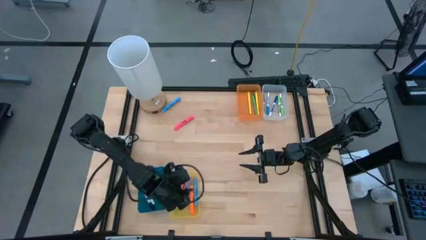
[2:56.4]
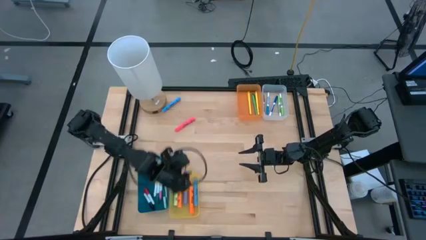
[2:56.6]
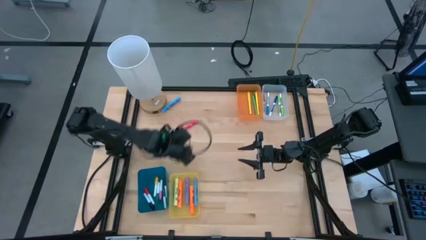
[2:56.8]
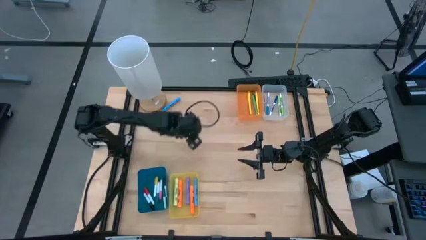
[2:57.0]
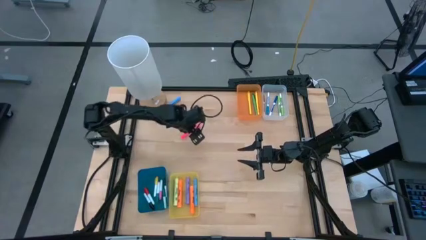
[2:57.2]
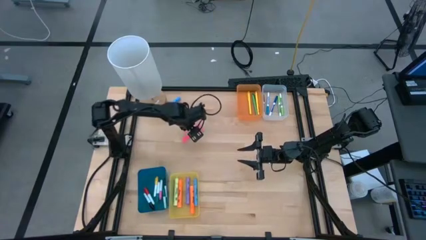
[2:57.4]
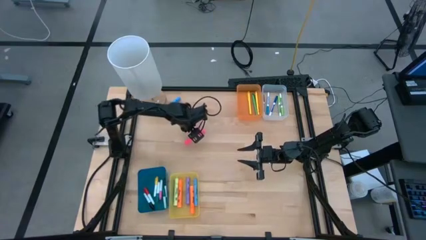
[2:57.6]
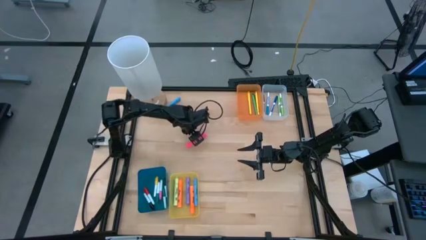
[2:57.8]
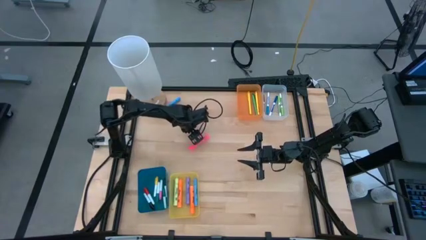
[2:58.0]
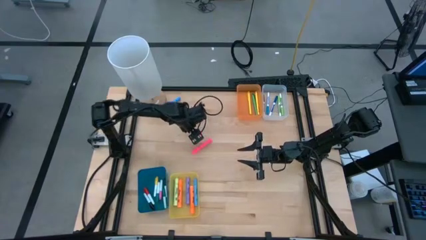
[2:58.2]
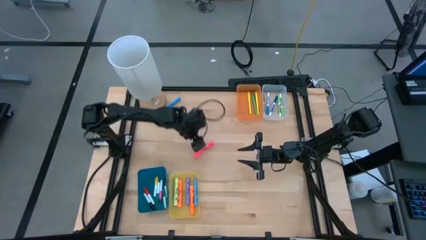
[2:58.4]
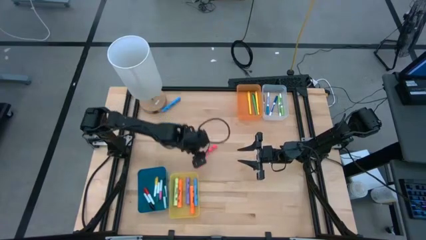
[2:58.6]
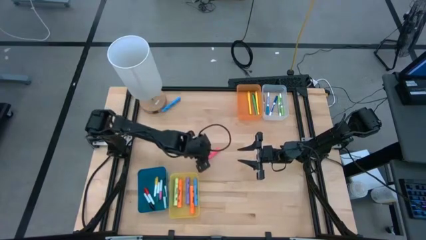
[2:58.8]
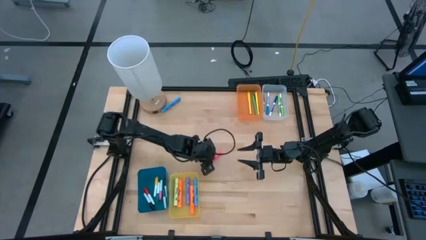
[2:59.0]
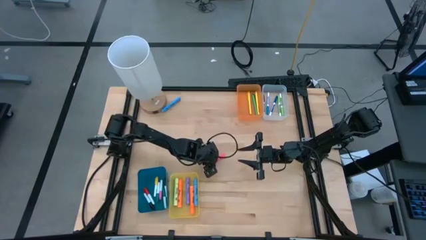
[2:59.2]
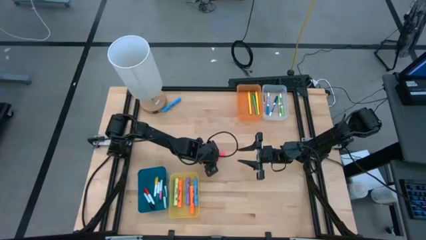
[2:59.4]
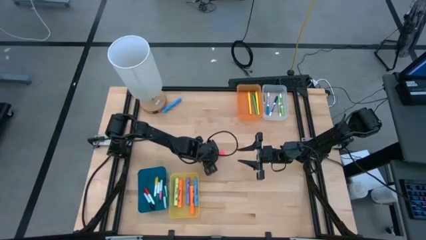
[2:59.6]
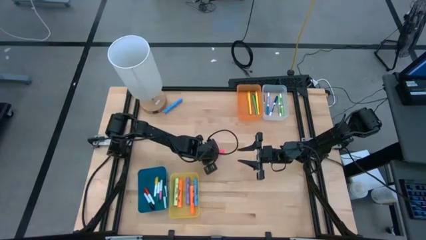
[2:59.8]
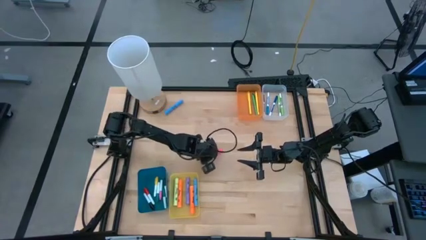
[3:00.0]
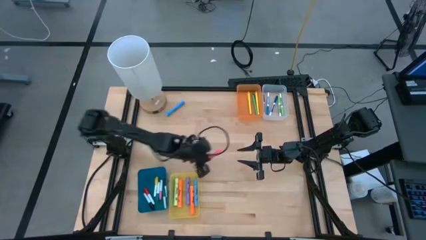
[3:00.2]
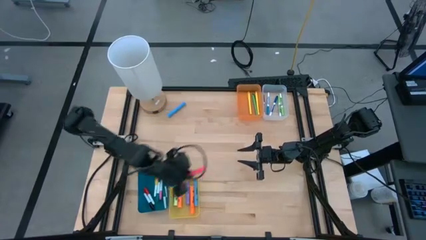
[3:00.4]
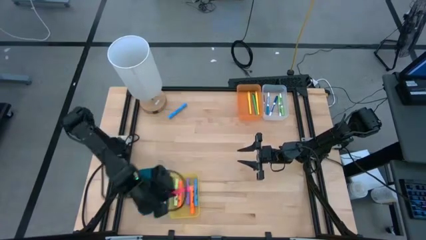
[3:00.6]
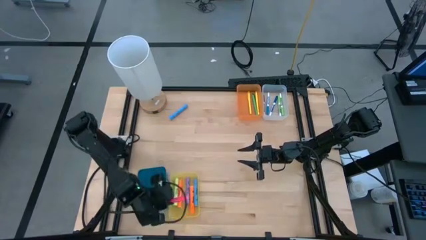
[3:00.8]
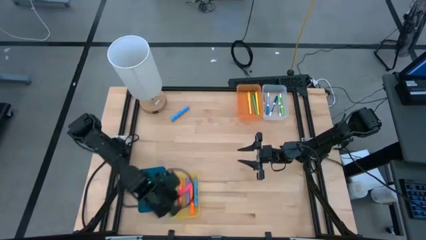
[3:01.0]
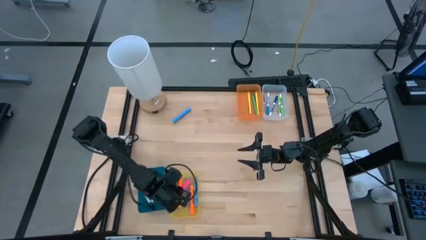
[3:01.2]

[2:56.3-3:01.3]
Task: Pick & Place Markers
Put the pink highlighter pen into the yellow bin

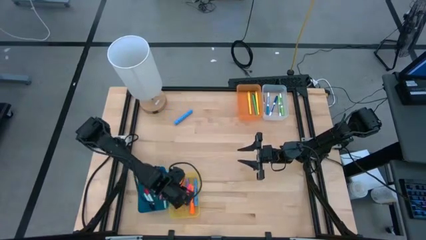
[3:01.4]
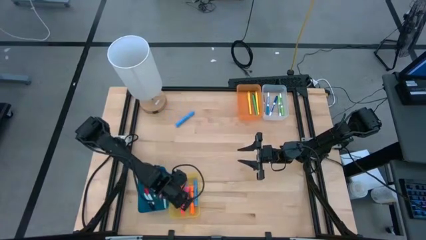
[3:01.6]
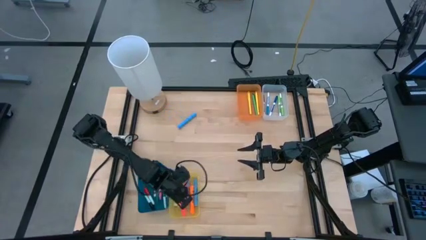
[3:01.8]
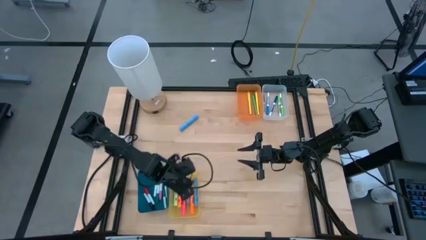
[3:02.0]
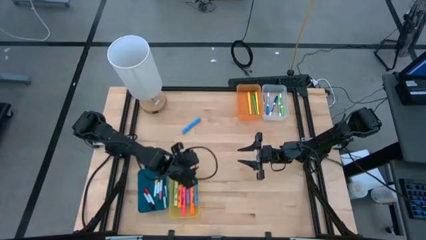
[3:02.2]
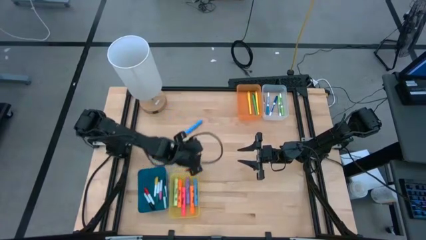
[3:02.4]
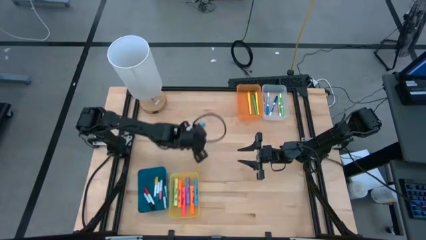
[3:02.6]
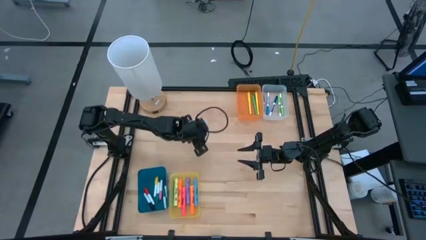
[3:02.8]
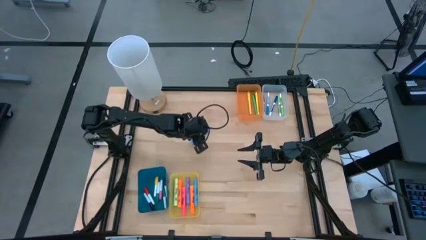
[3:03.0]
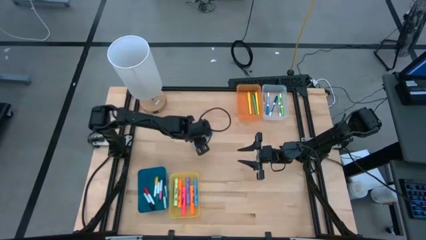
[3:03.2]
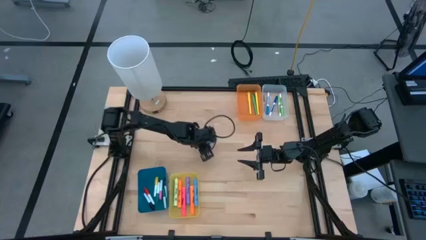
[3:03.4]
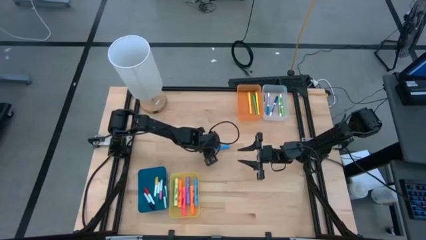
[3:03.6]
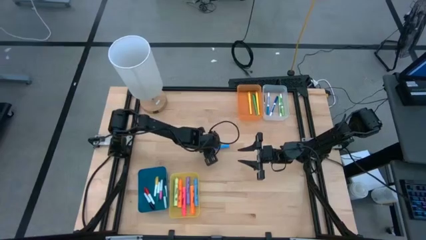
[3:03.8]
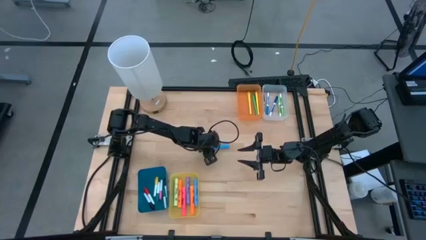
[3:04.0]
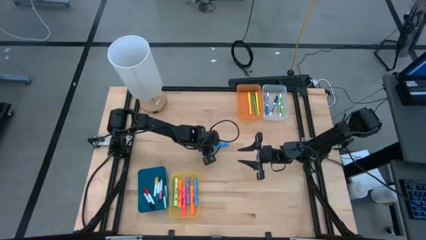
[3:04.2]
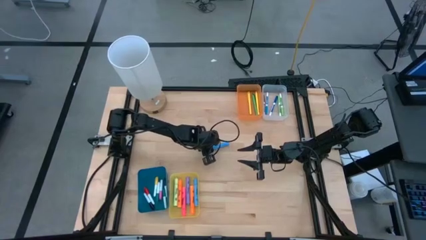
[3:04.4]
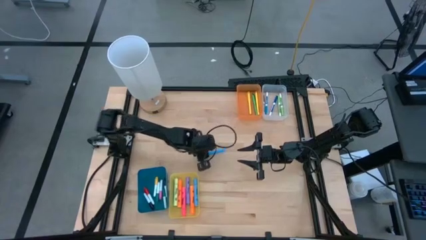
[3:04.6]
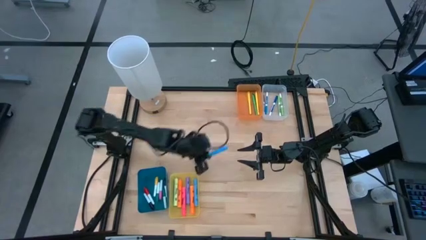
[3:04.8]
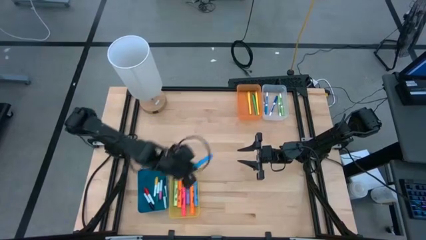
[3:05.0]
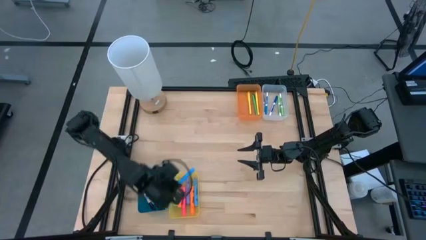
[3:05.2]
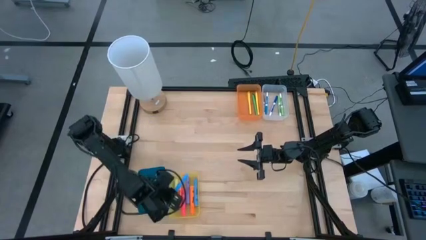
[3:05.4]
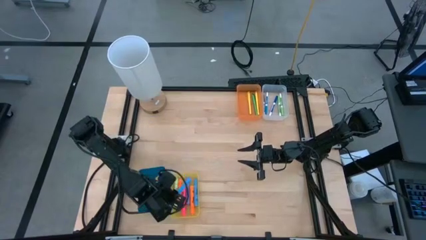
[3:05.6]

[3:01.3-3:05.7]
Put the light blue highlighter pen into the yellow bin

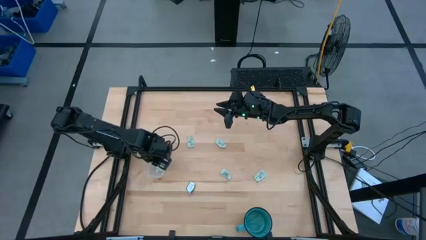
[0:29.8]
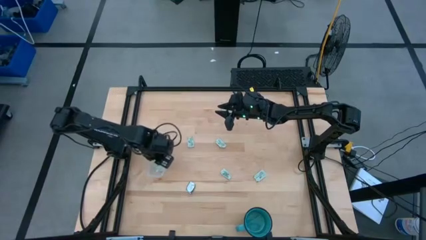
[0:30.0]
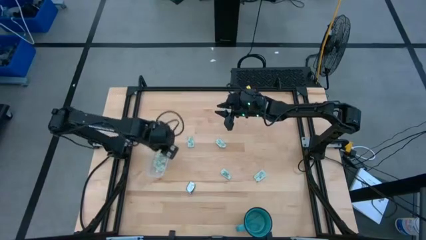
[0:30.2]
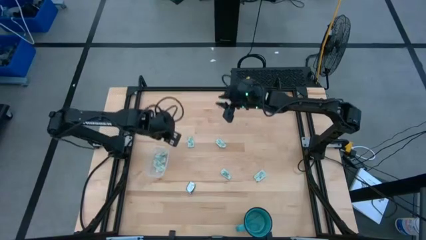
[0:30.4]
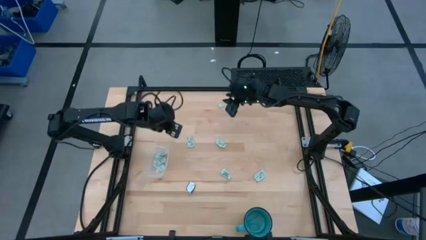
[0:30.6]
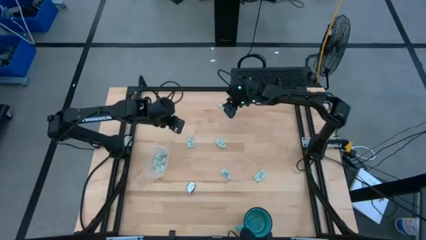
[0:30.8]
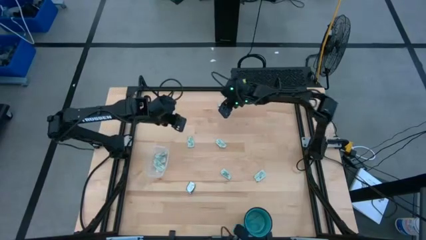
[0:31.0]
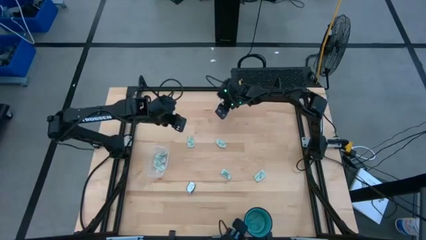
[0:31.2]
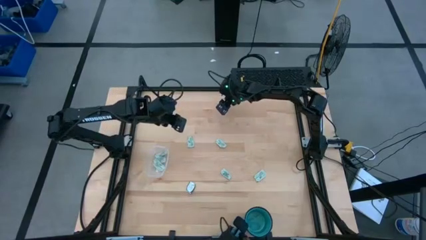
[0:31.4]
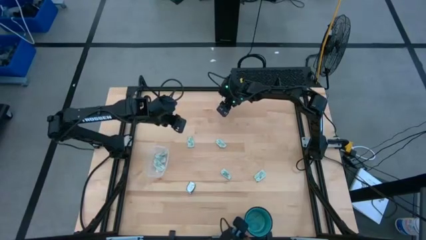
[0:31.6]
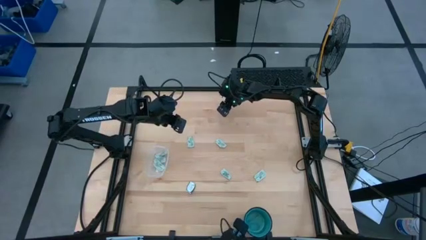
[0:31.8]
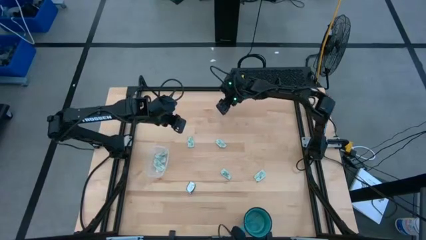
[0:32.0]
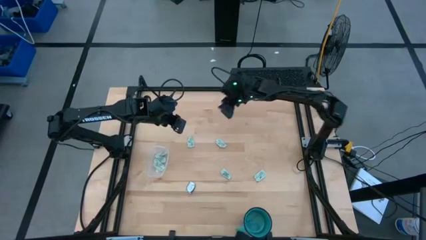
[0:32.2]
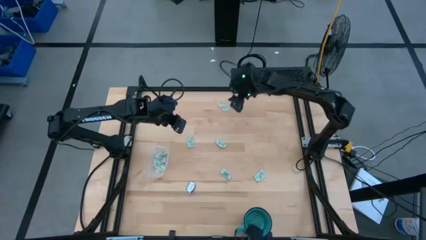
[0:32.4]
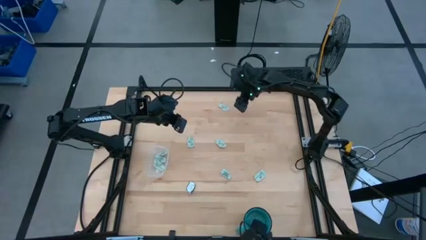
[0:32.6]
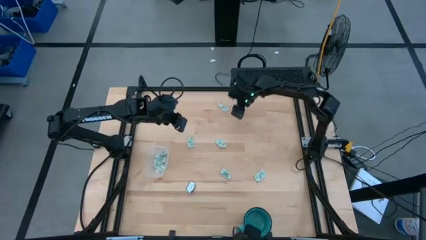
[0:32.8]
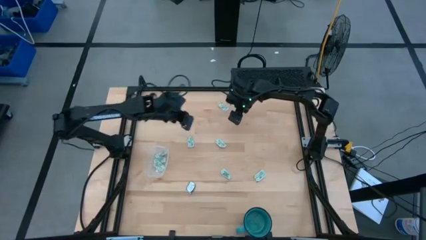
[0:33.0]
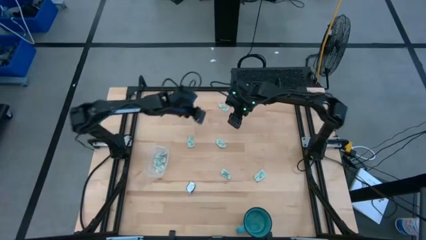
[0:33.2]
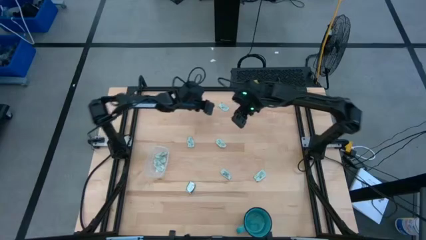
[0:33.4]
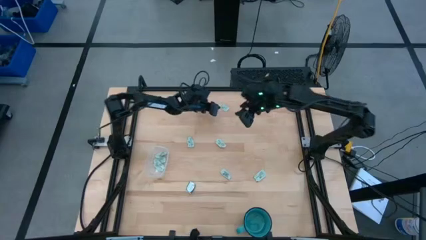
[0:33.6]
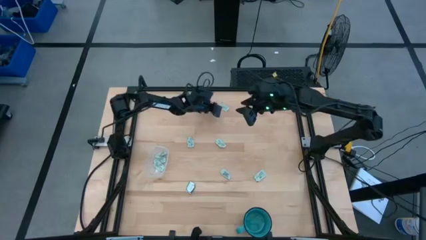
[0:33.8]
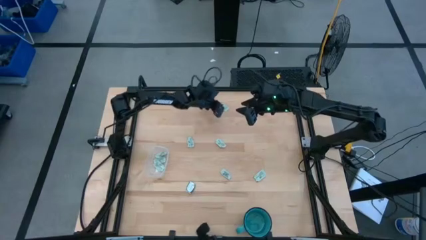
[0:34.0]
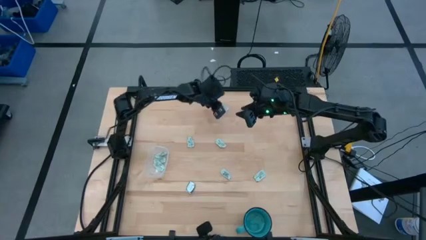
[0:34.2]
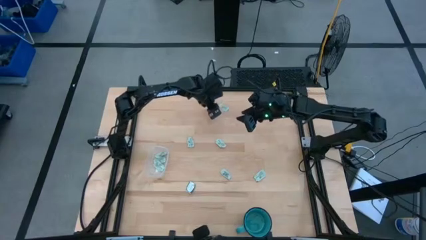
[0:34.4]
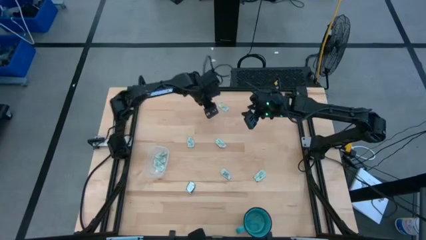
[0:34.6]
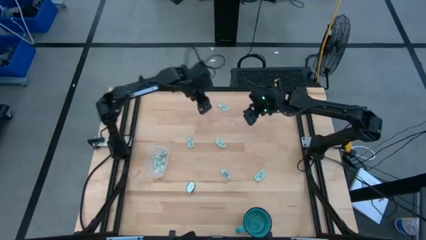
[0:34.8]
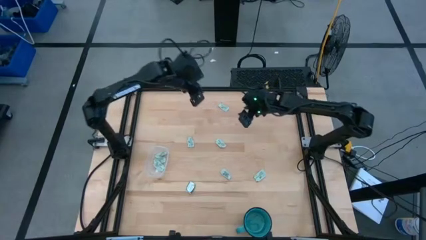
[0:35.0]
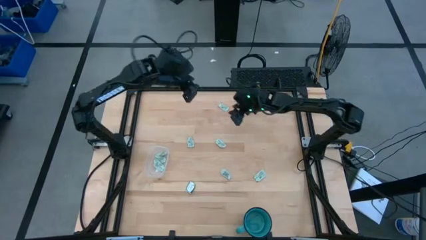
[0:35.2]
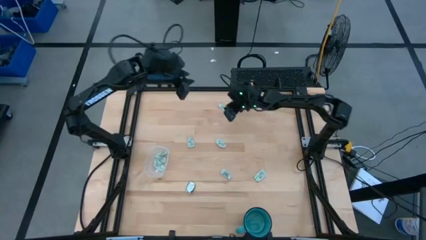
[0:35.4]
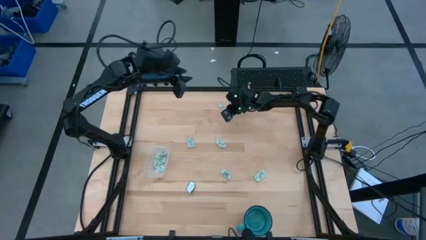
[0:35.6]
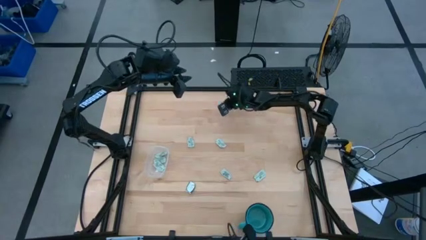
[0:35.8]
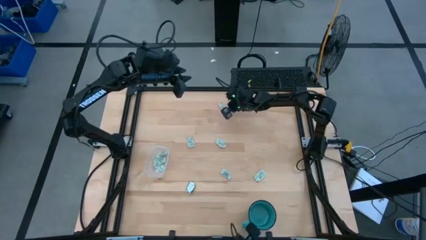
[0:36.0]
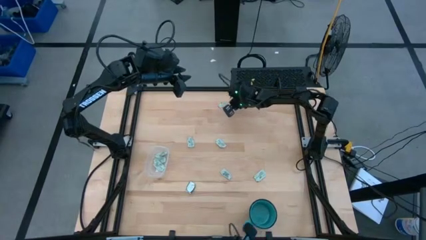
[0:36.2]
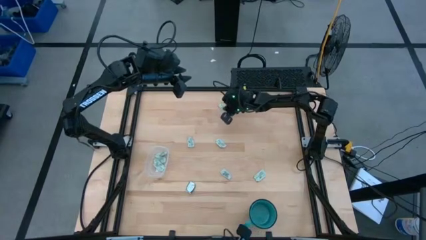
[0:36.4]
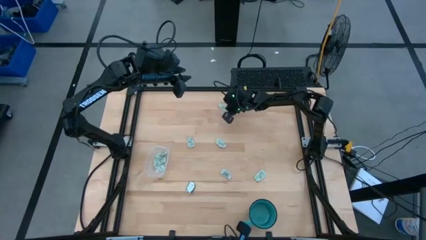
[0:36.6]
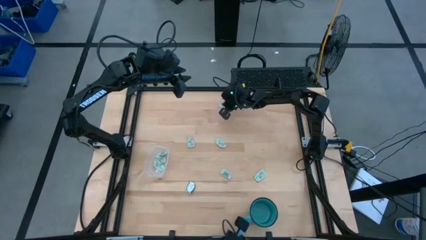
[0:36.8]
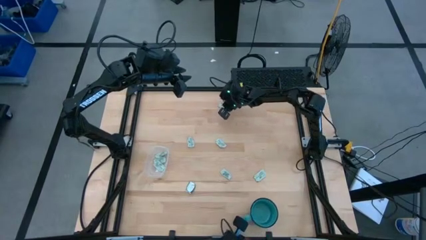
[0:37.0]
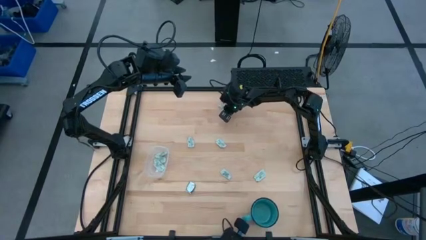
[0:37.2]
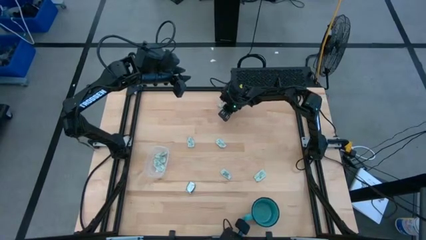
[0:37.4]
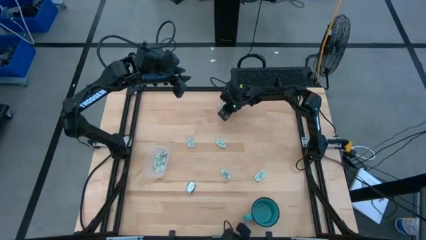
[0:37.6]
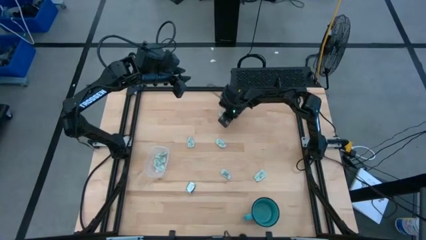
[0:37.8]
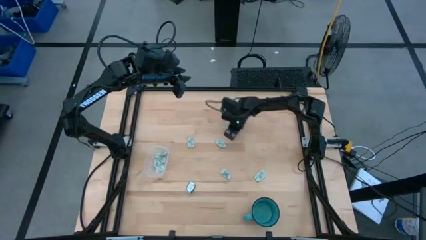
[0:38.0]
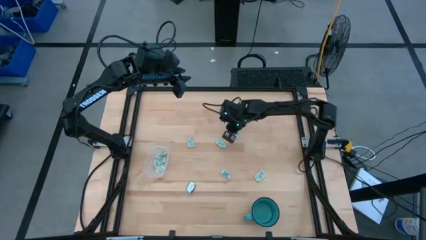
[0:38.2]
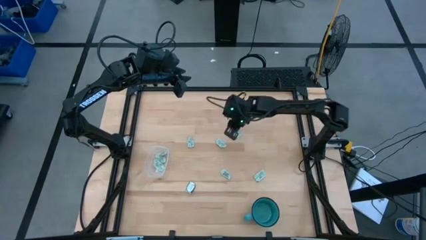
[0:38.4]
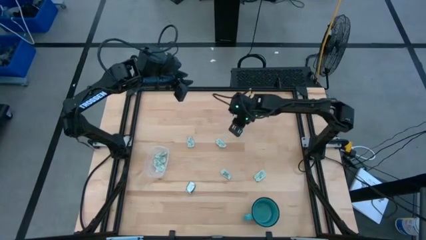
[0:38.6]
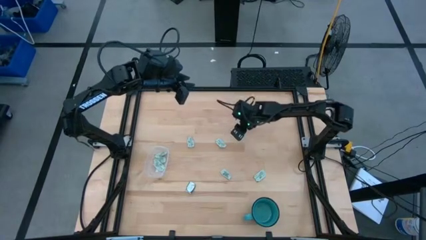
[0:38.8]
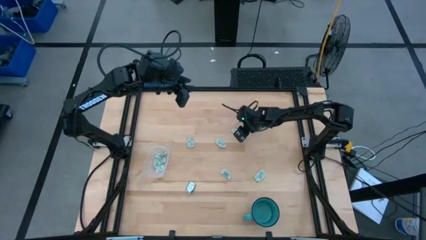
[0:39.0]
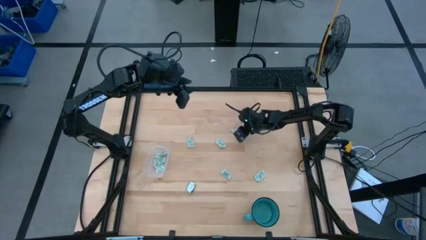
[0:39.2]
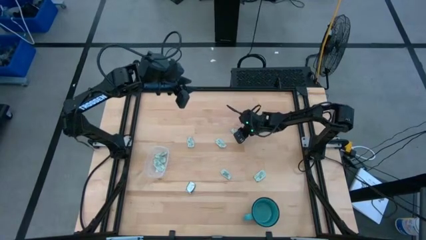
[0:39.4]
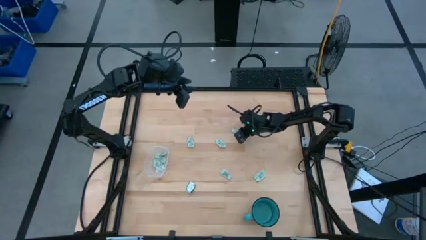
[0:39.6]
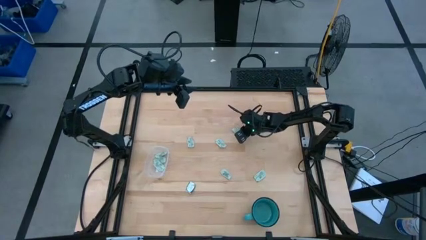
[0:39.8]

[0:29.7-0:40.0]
Task: Pick and place Stevia / Truvia into bins
Put the light green stevia packet into the transparent bin
